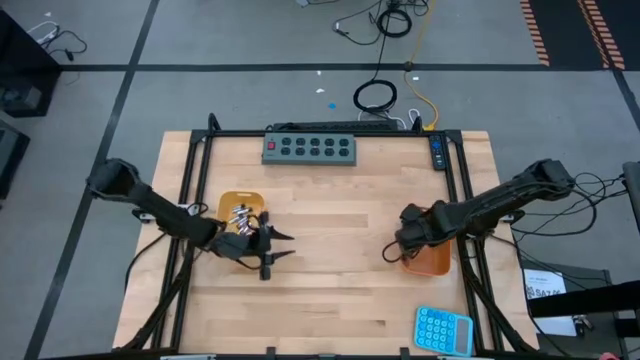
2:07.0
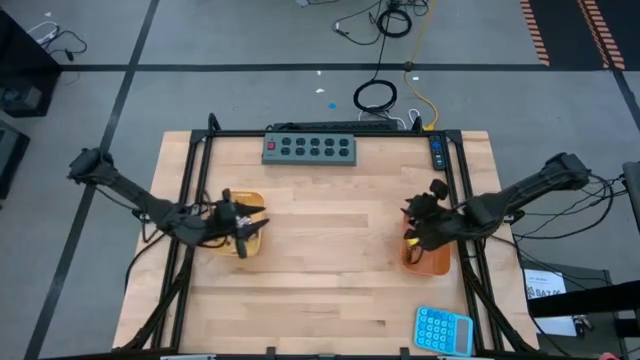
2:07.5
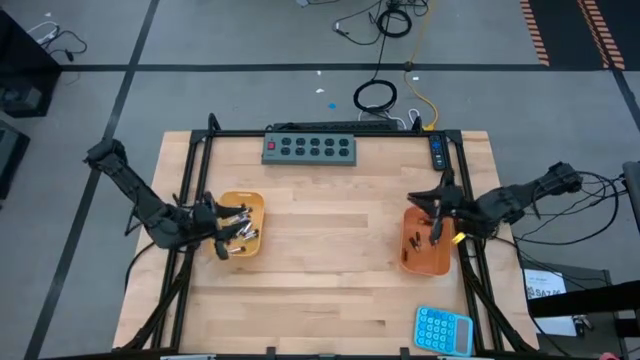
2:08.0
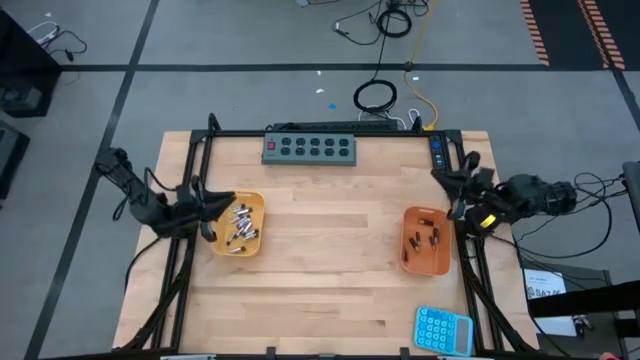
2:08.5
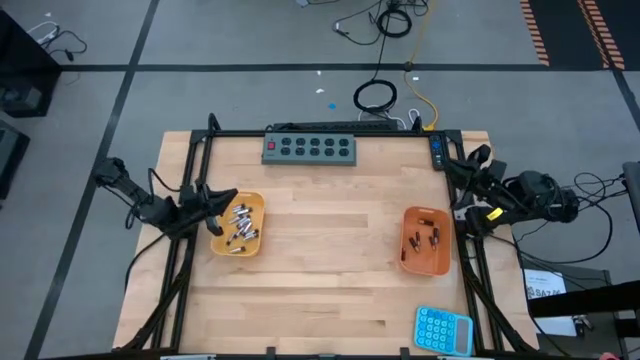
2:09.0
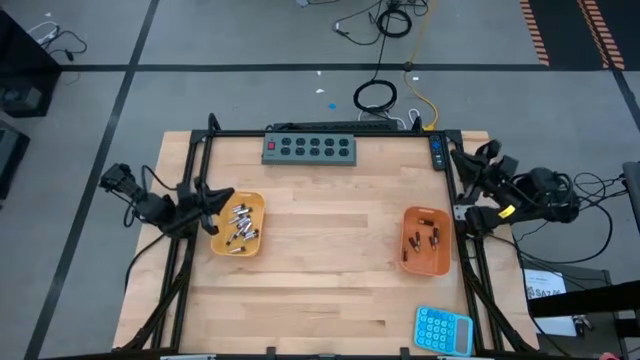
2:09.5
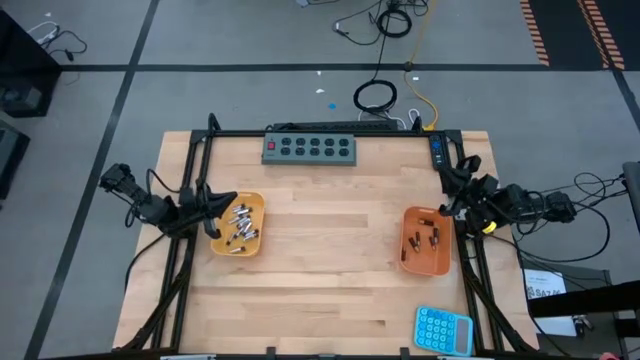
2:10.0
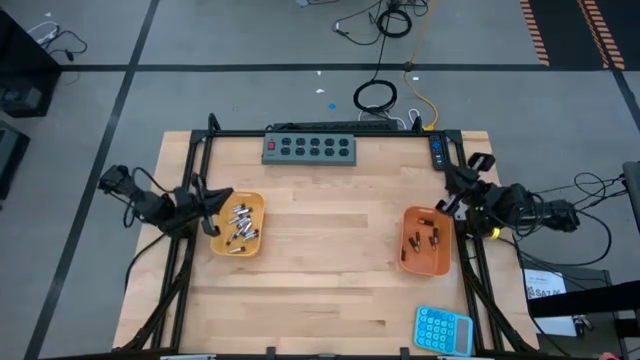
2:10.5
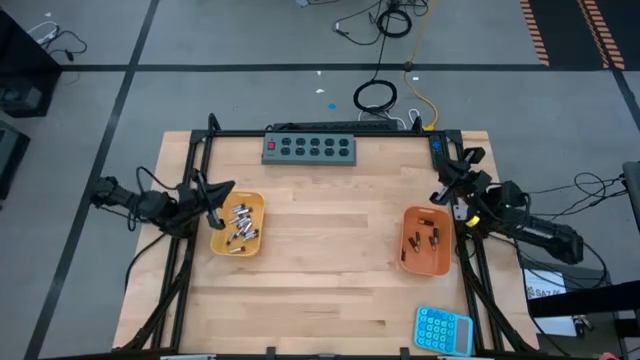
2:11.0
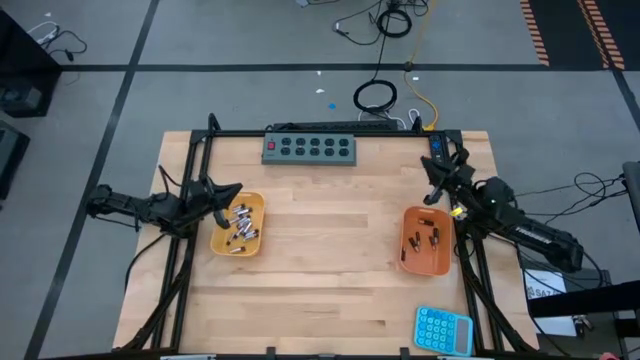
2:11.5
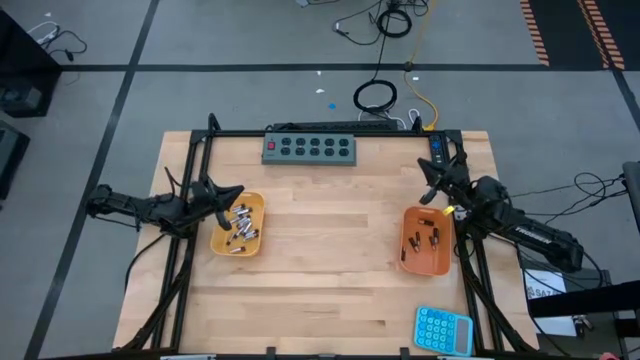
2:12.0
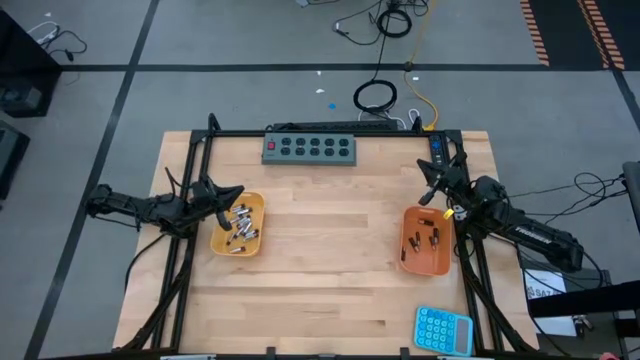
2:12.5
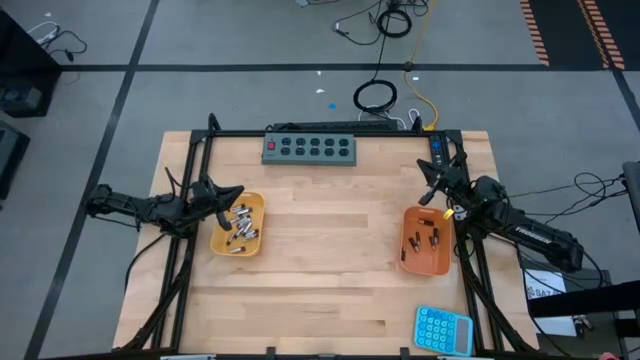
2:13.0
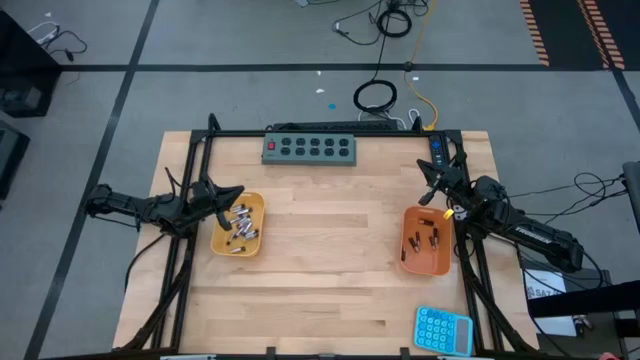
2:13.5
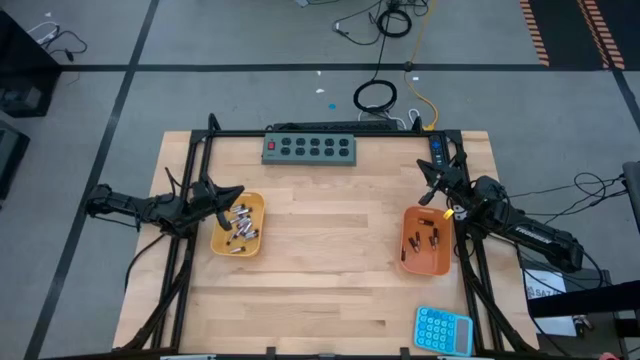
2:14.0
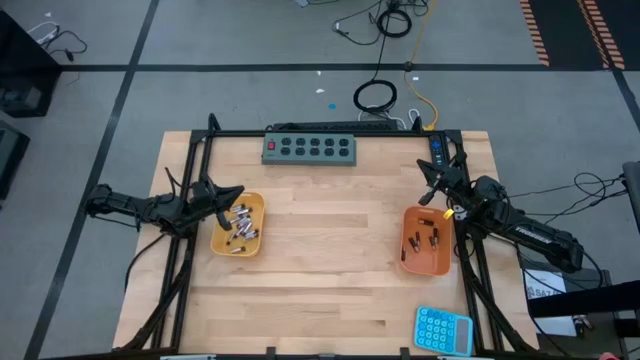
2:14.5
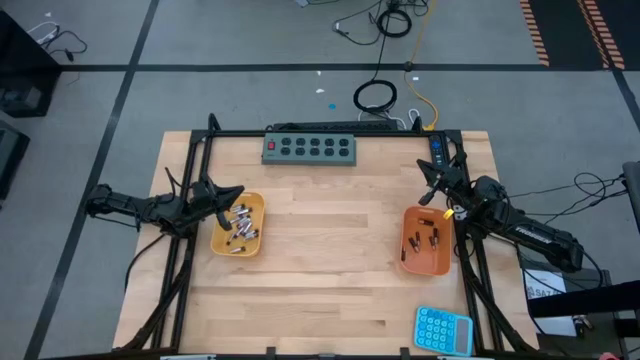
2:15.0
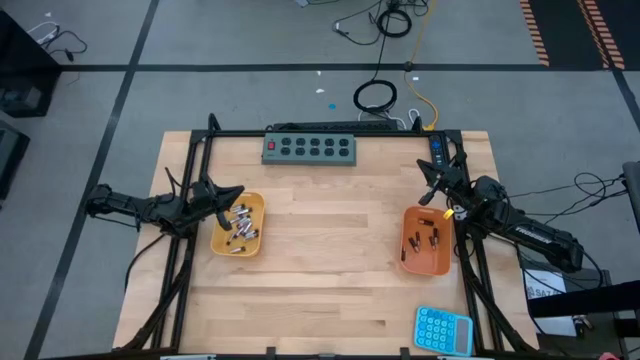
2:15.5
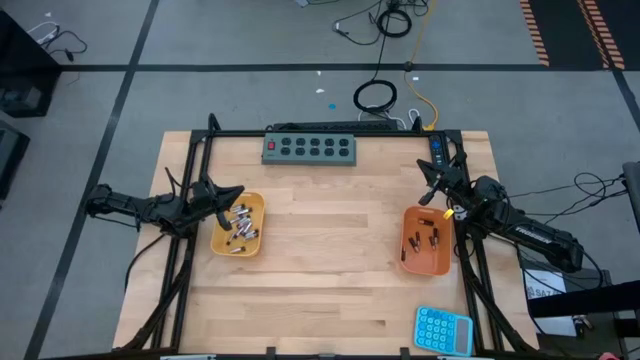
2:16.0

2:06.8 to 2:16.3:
Task: Sort batteries
Return to Home Position

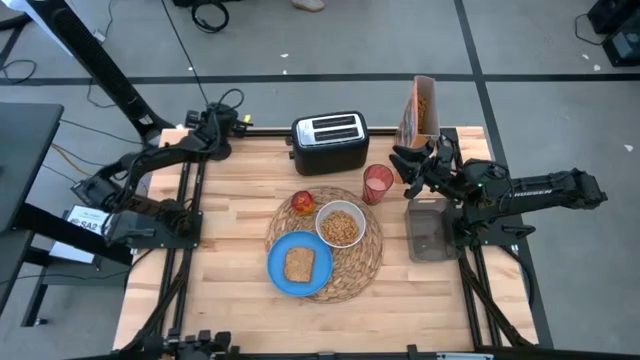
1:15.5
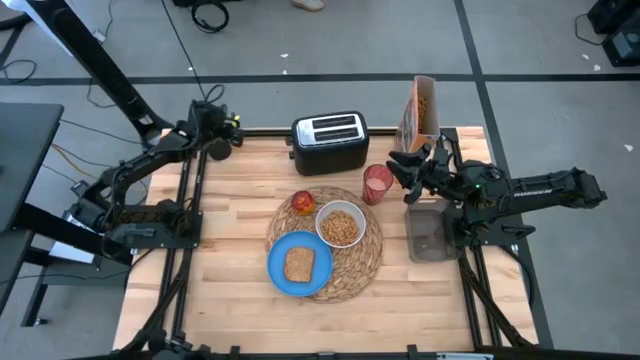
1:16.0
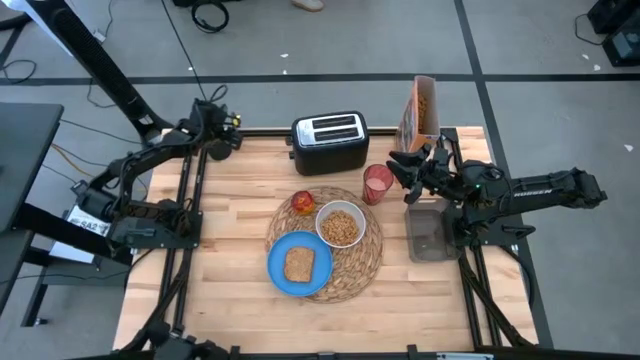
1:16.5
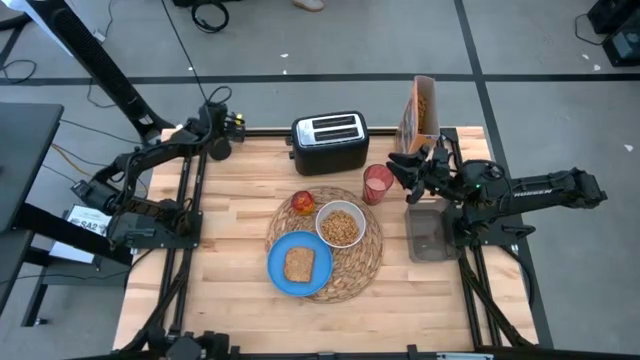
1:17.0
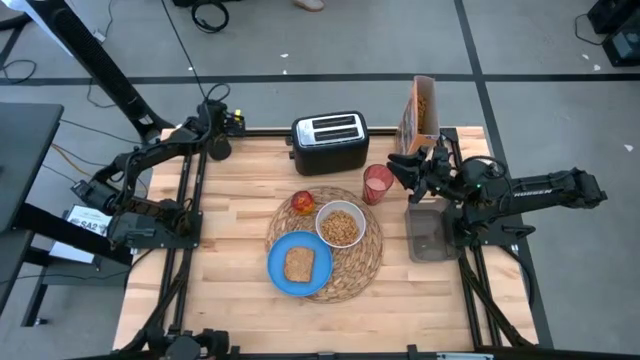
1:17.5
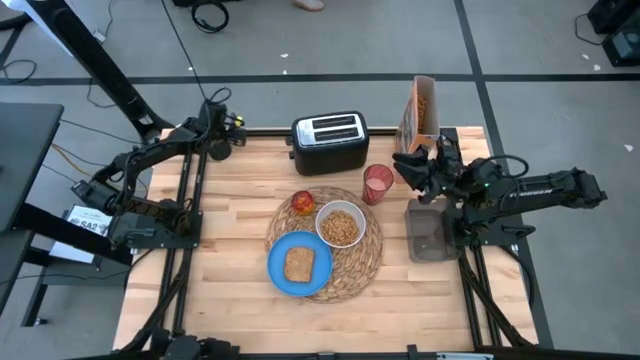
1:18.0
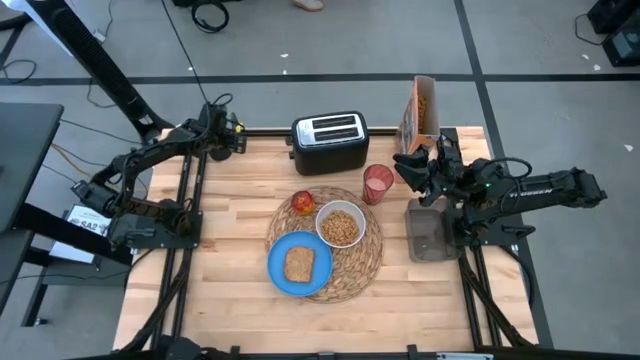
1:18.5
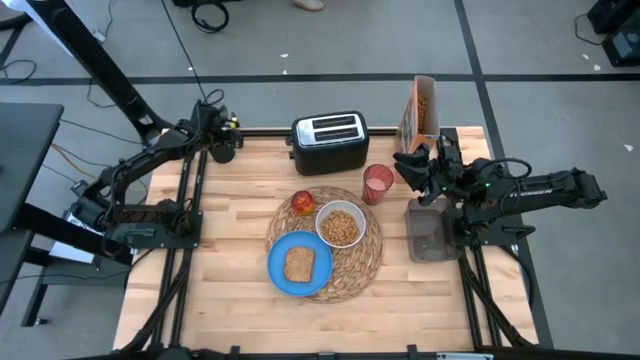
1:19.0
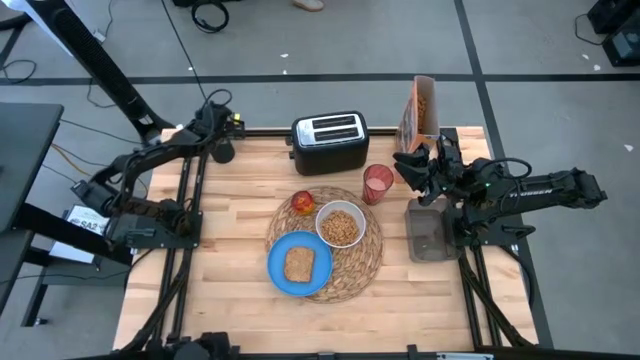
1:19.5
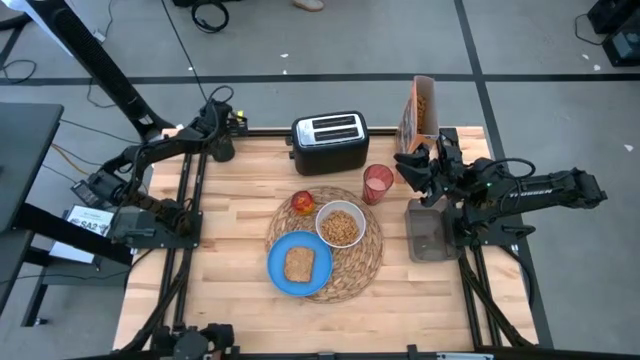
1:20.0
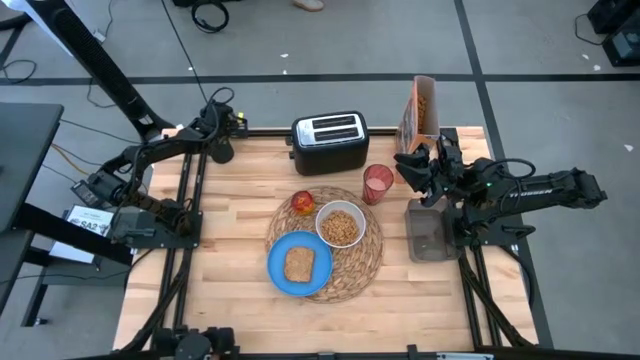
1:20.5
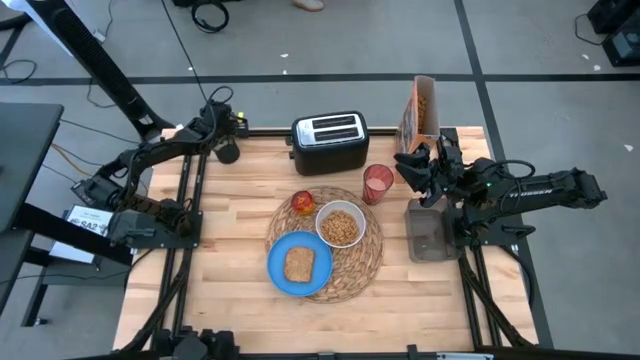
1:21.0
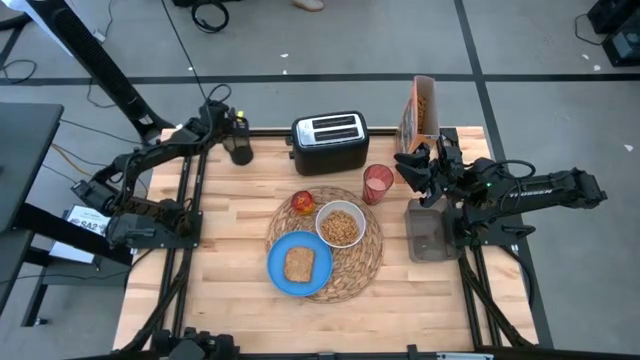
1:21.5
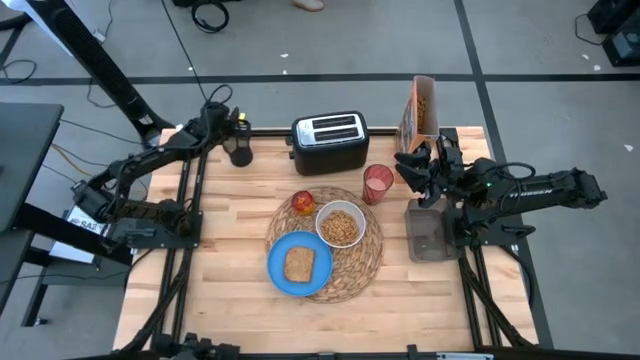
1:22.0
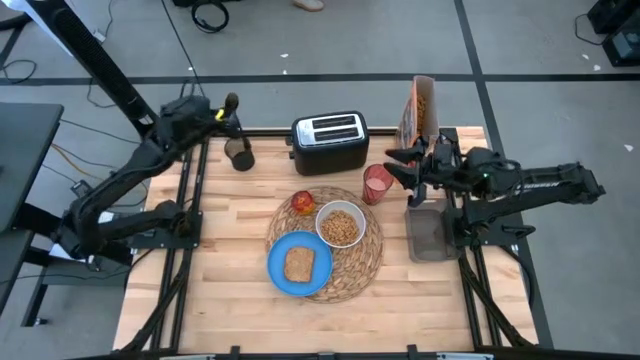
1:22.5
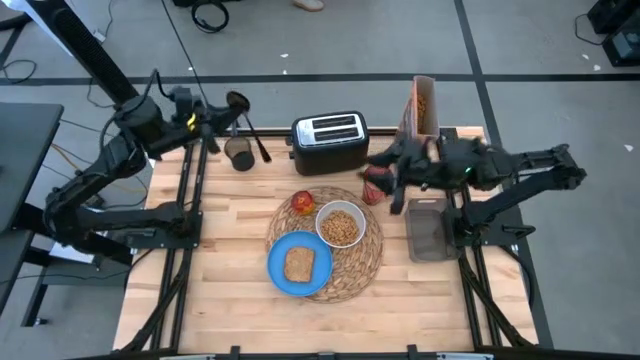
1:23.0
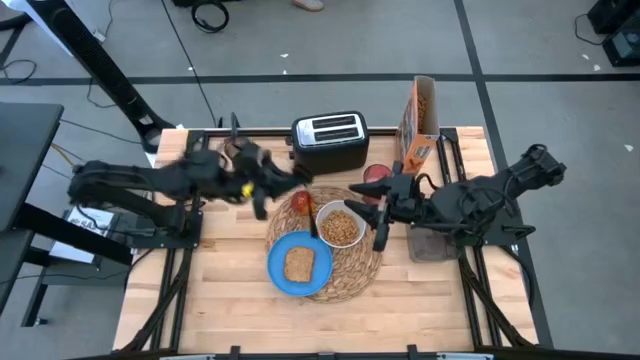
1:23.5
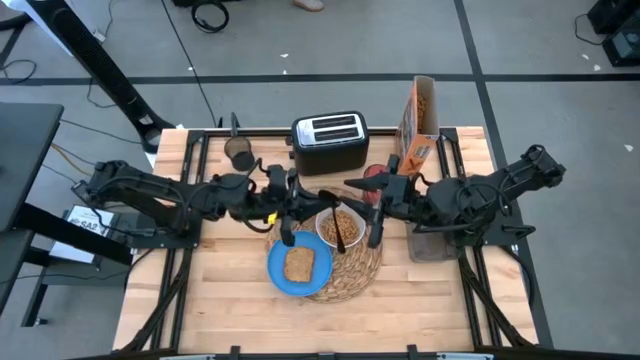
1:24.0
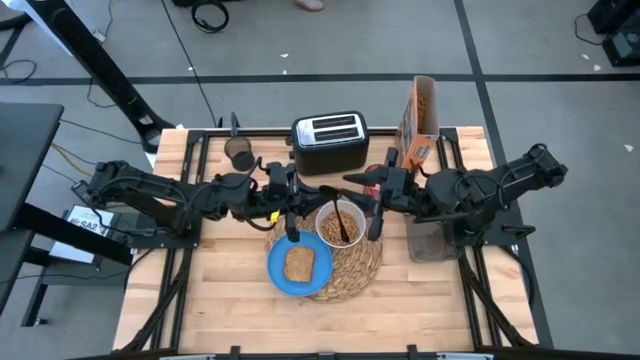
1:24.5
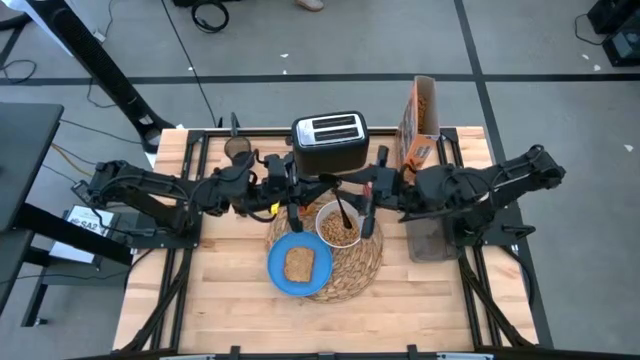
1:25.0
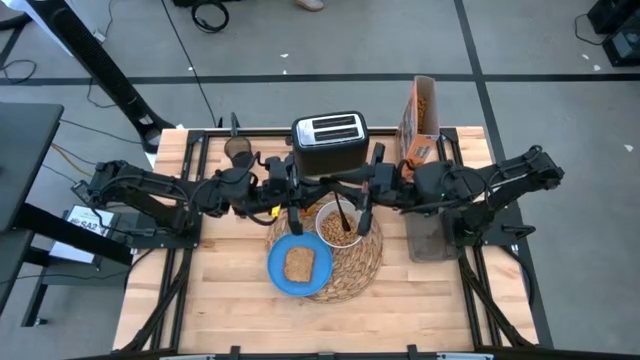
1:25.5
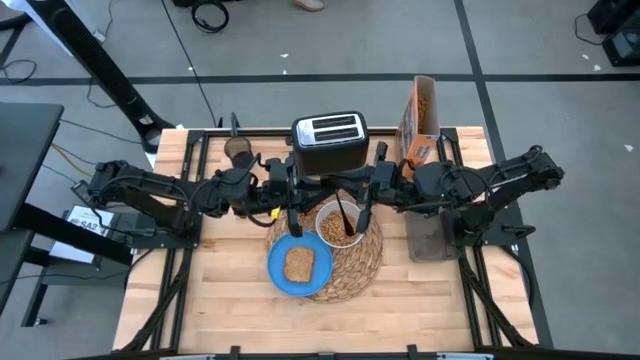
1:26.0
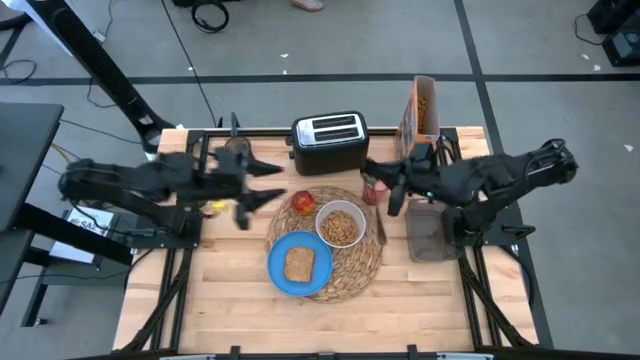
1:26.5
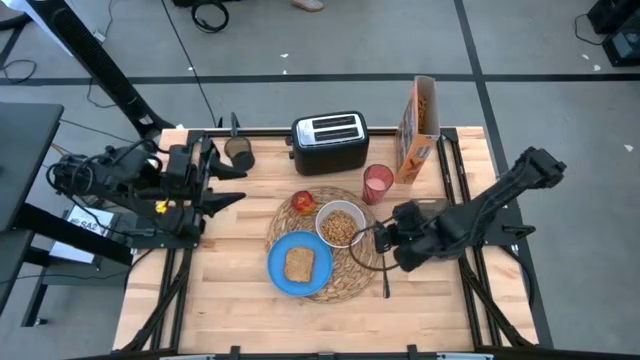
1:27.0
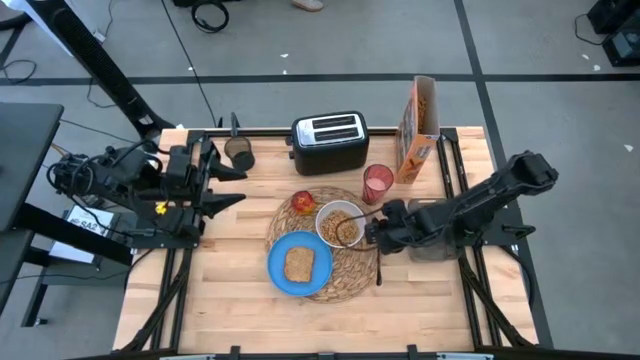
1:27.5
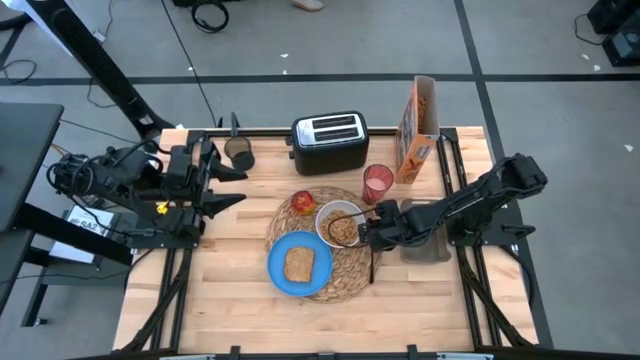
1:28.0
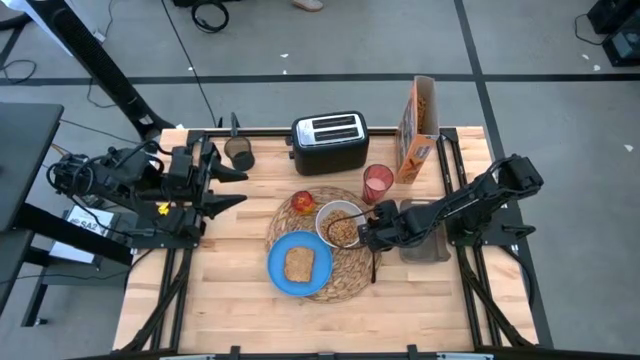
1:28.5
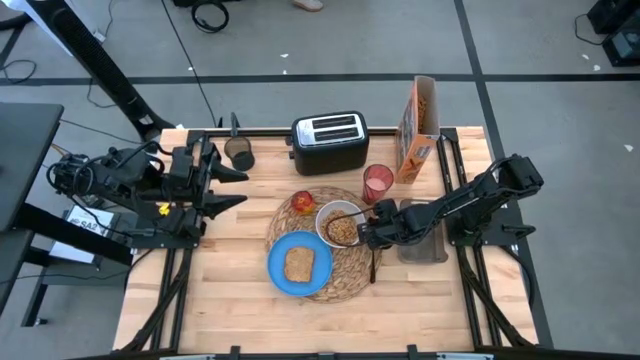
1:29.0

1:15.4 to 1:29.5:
Task: Arrange a breakfast setting
Put the black spoon on top of the brown table mat to the right of the white bowl
